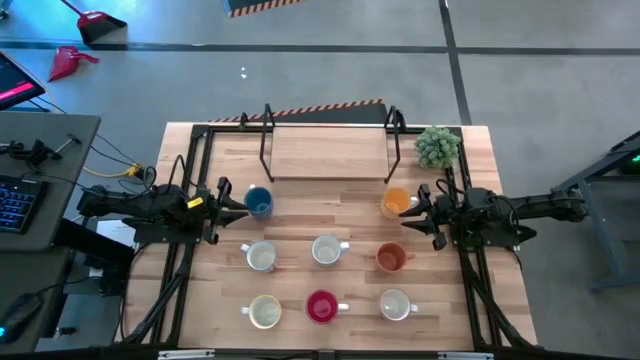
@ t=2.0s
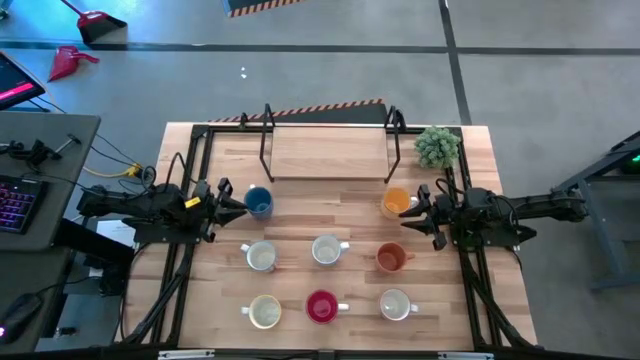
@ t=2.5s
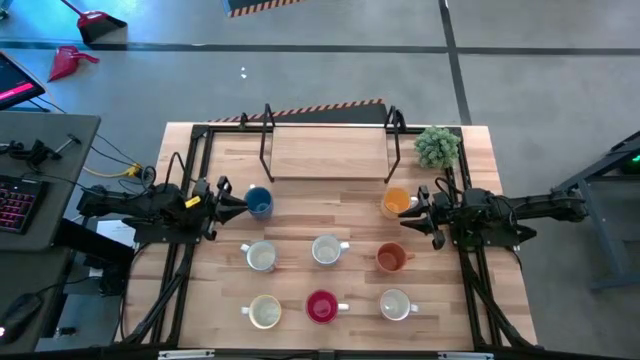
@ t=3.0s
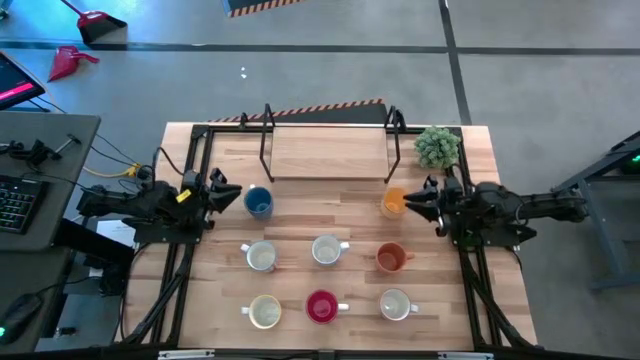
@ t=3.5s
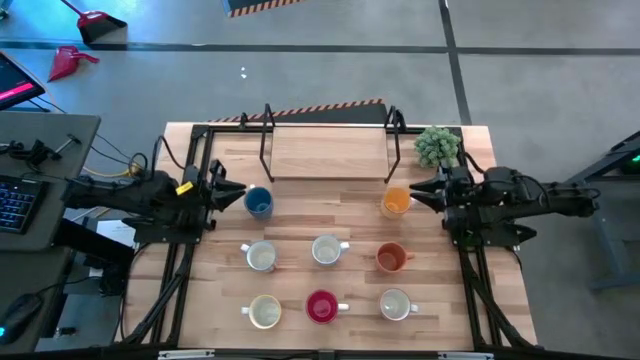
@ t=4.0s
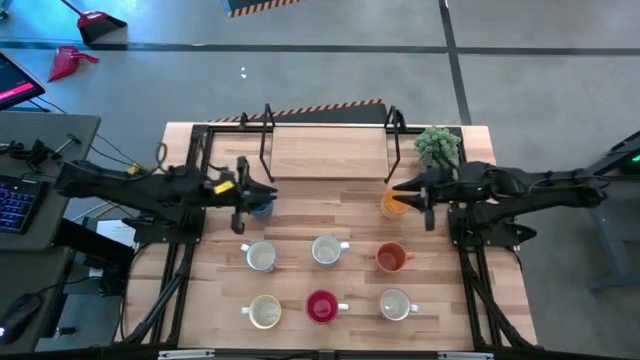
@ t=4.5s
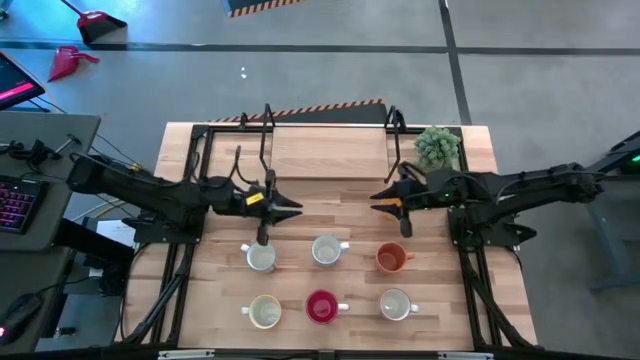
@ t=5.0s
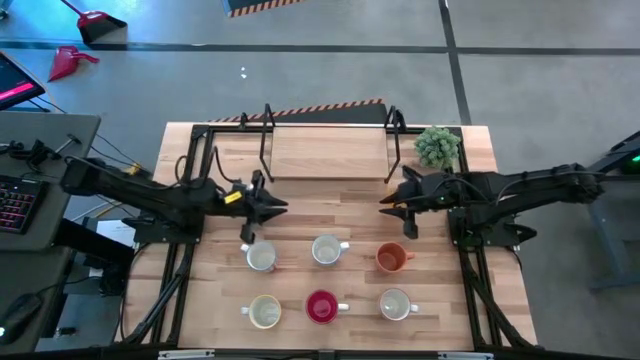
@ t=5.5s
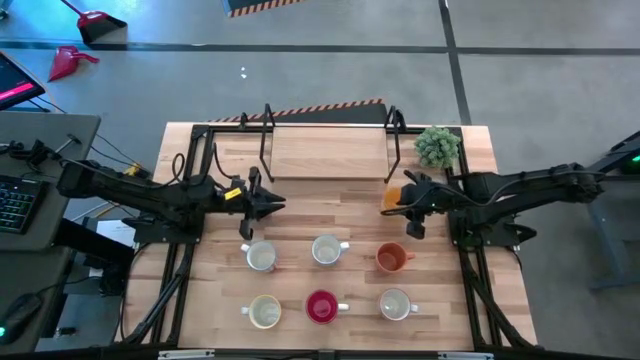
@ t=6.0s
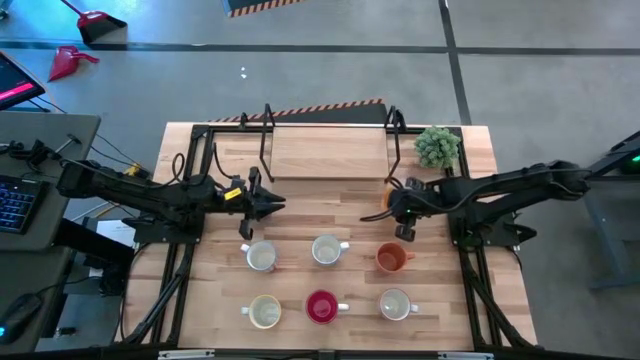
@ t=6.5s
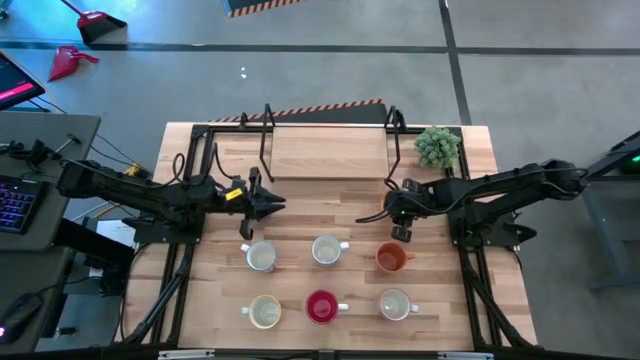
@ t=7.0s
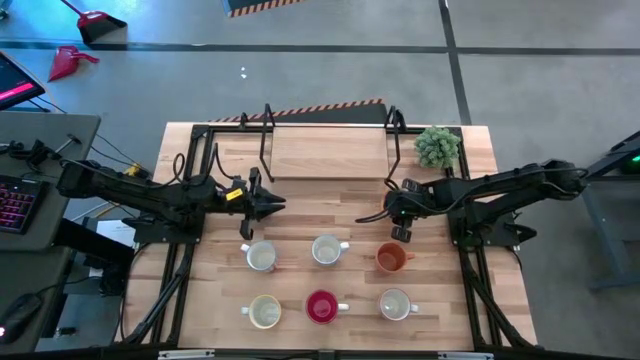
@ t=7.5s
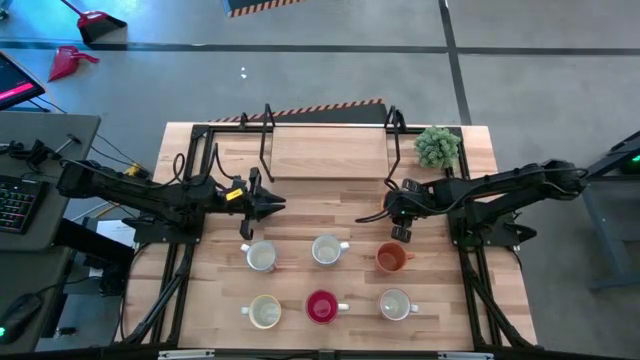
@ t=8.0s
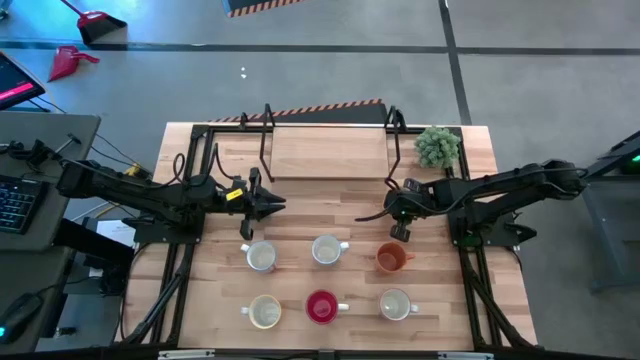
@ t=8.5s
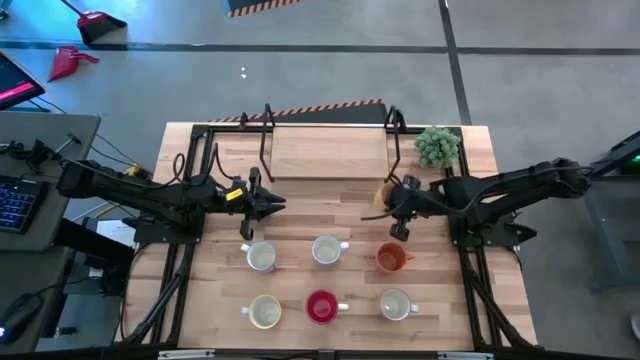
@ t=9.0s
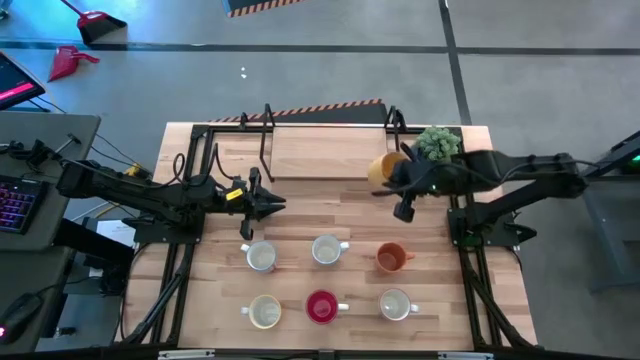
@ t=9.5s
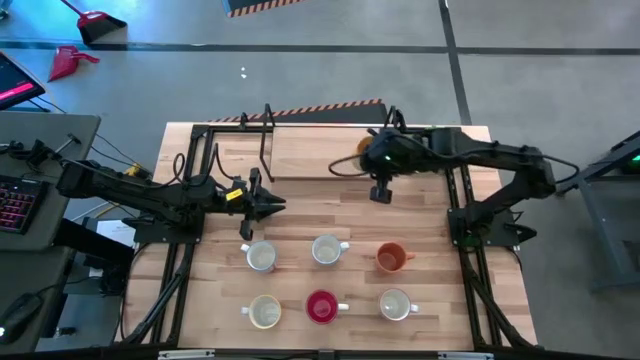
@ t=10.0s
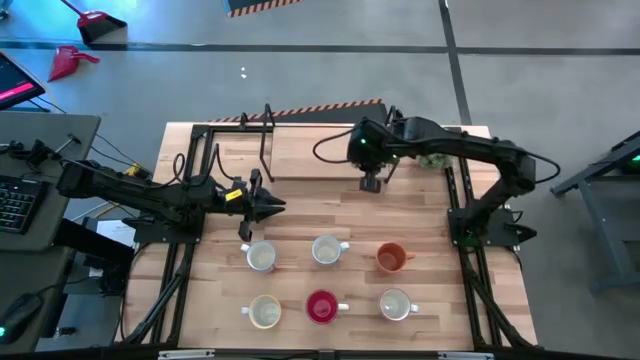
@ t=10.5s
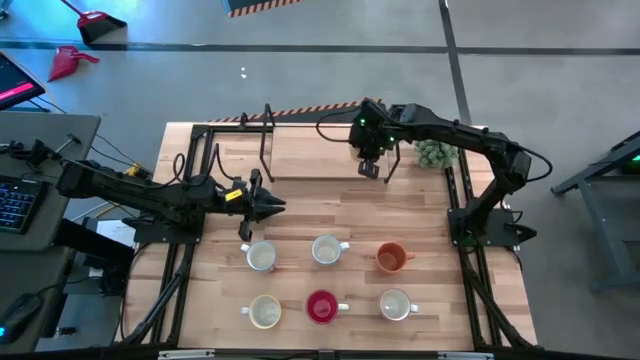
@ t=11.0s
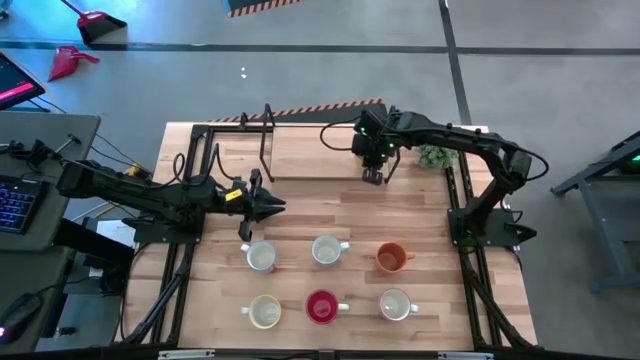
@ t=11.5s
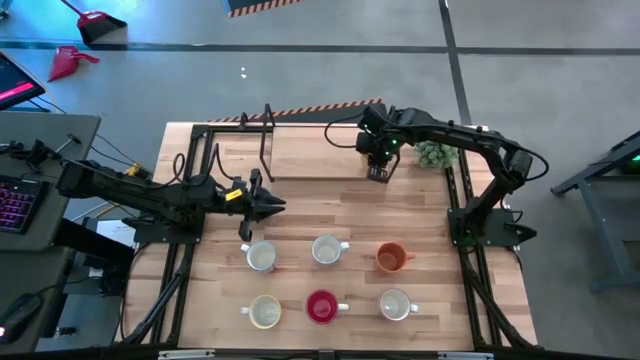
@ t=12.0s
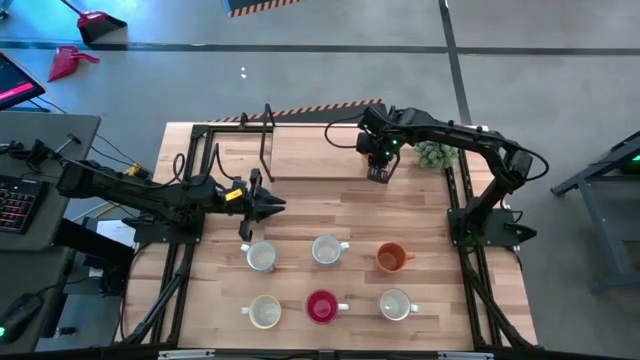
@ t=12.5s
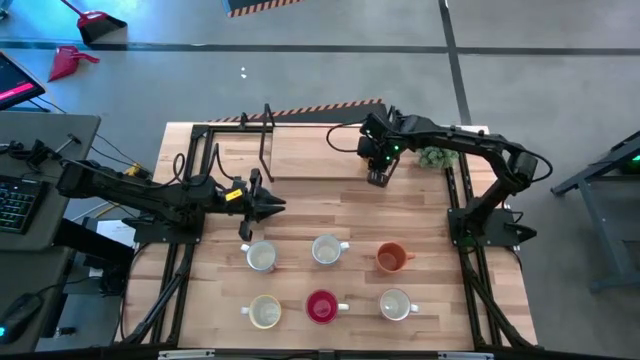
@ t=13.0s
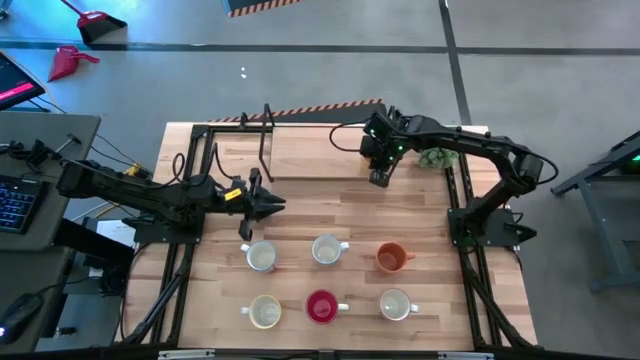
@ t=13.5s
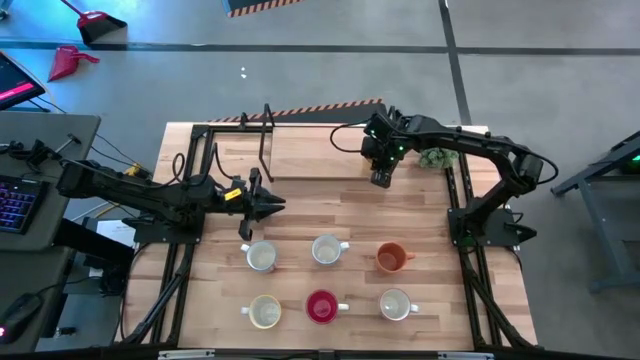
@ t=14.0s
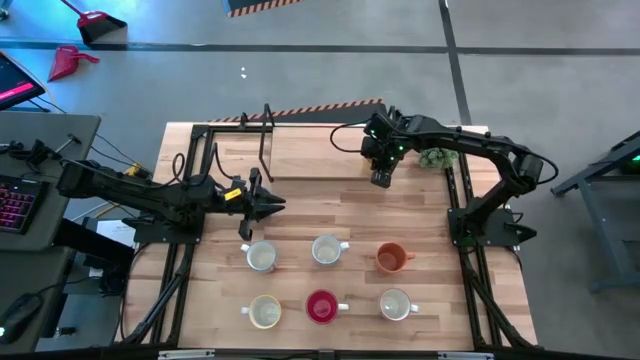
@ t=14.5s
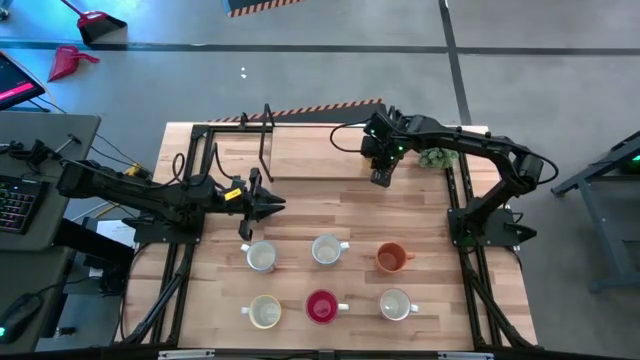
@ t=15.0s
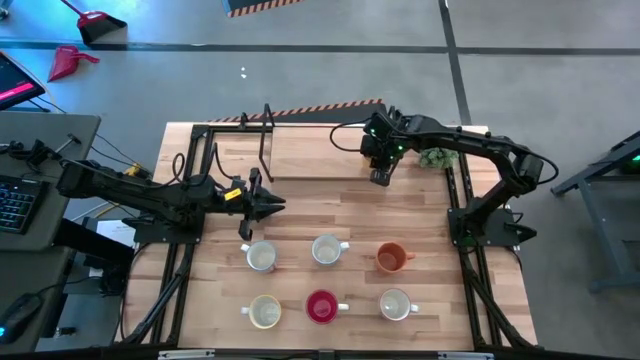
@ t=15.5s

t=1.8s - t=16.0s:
Task: Place coffee mugs
Put the yellow mug on the shelf

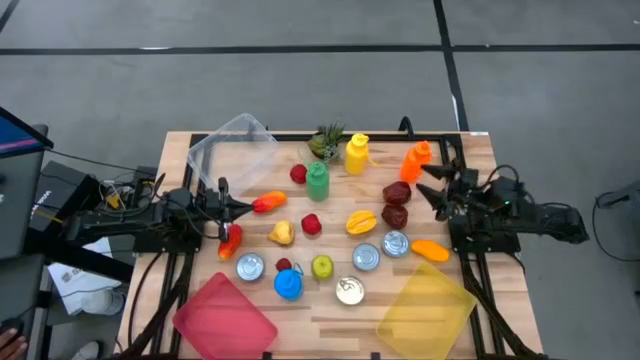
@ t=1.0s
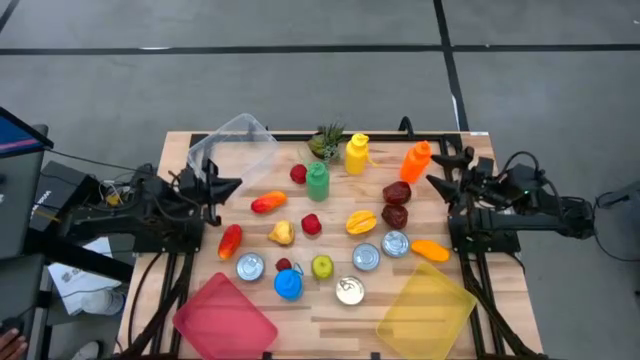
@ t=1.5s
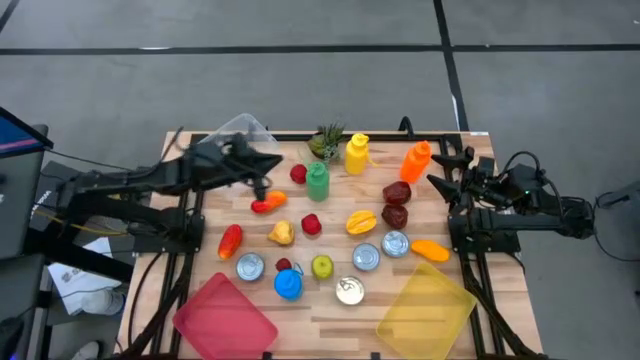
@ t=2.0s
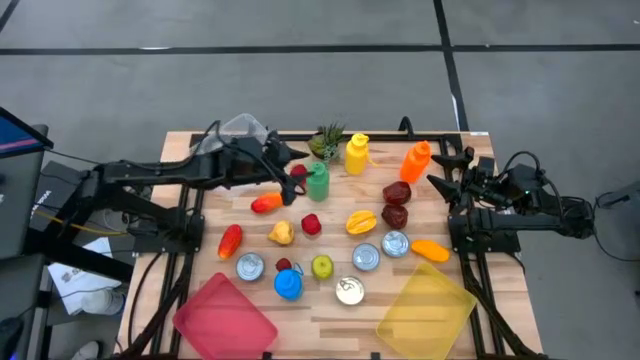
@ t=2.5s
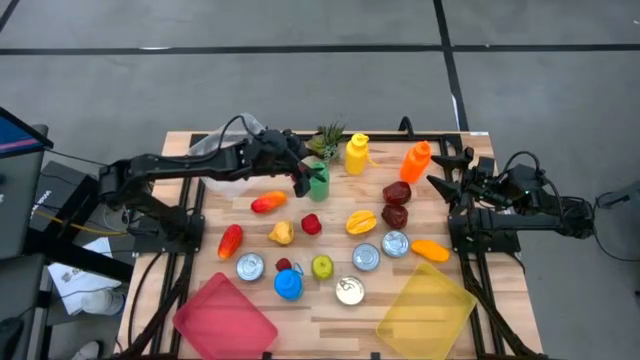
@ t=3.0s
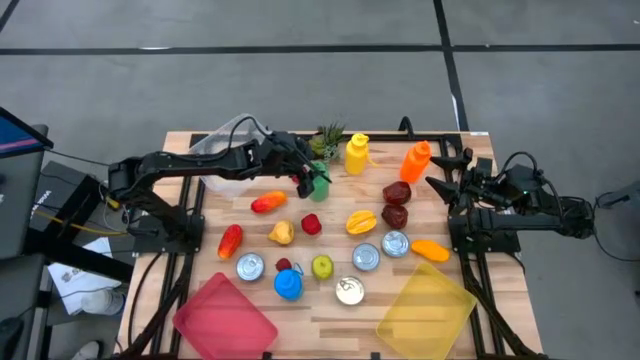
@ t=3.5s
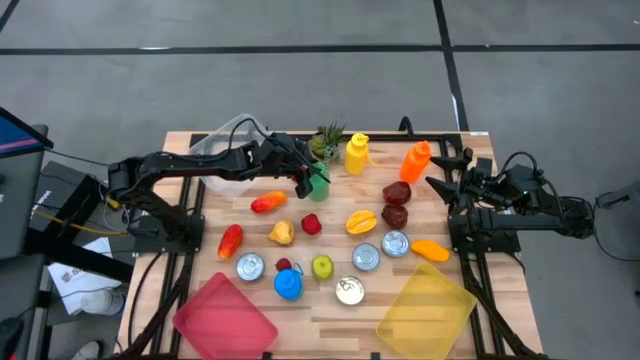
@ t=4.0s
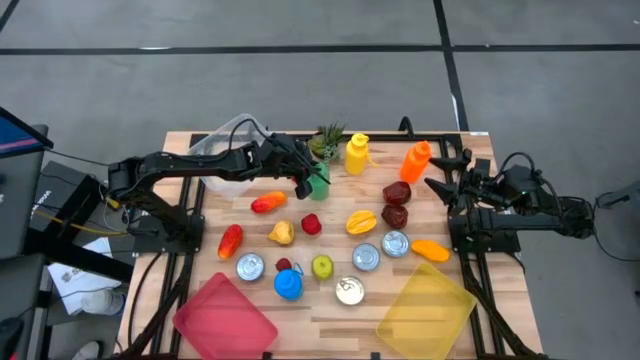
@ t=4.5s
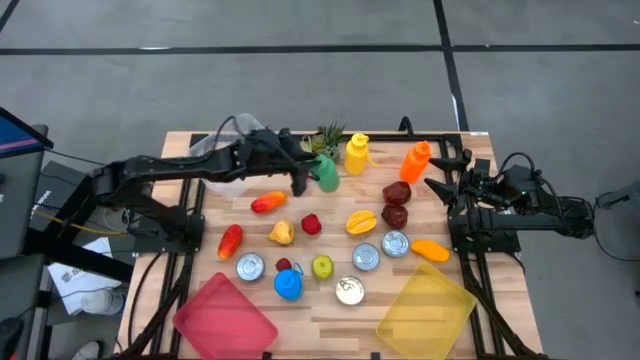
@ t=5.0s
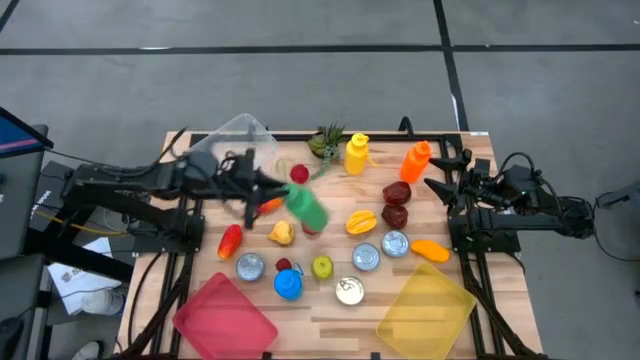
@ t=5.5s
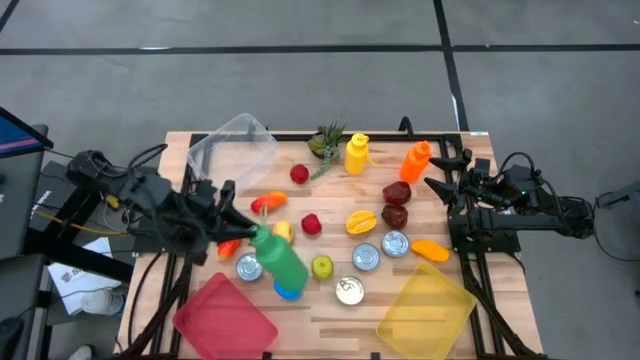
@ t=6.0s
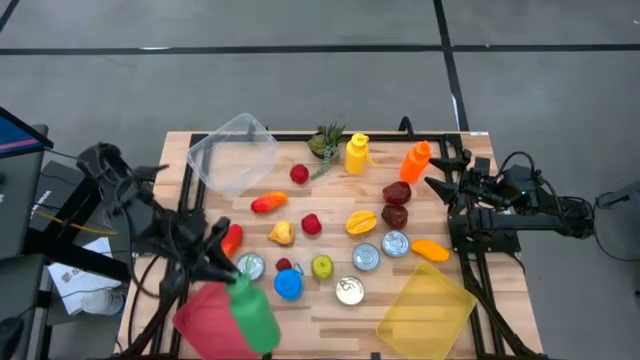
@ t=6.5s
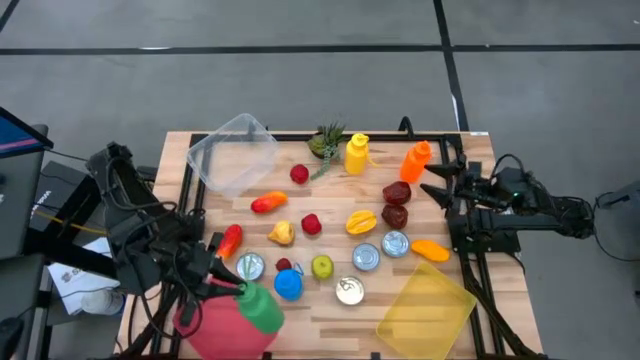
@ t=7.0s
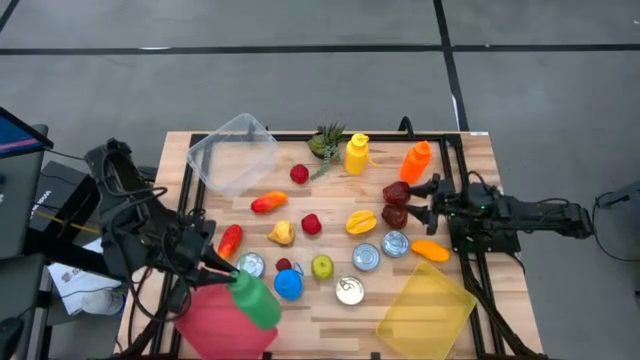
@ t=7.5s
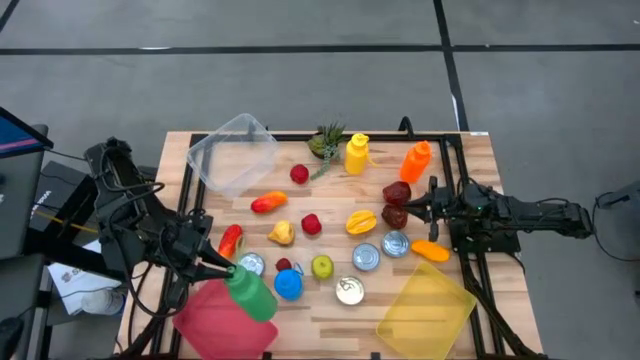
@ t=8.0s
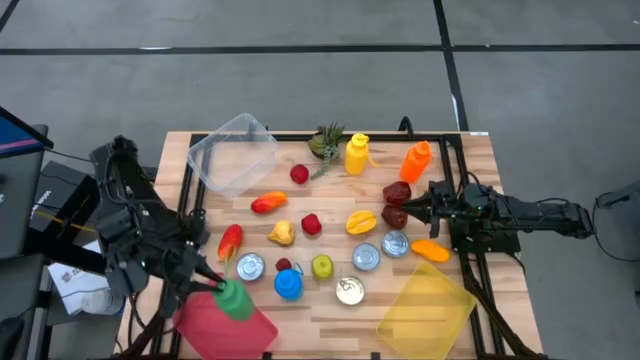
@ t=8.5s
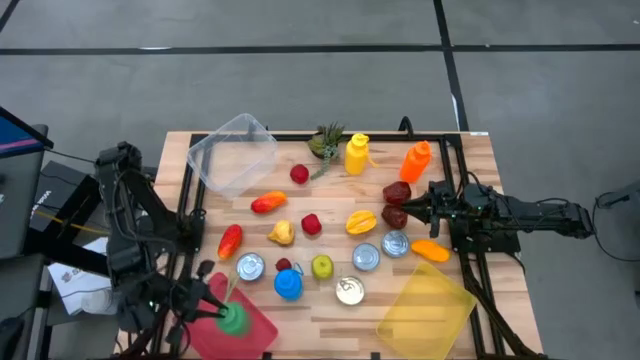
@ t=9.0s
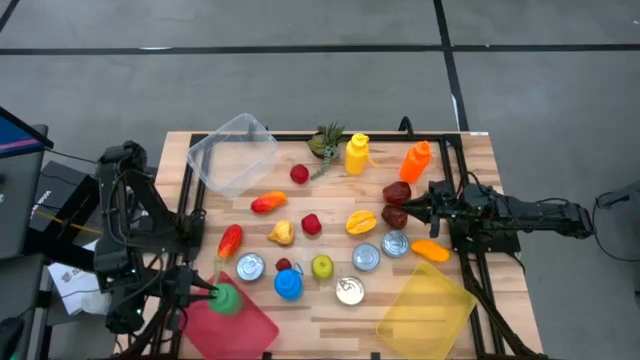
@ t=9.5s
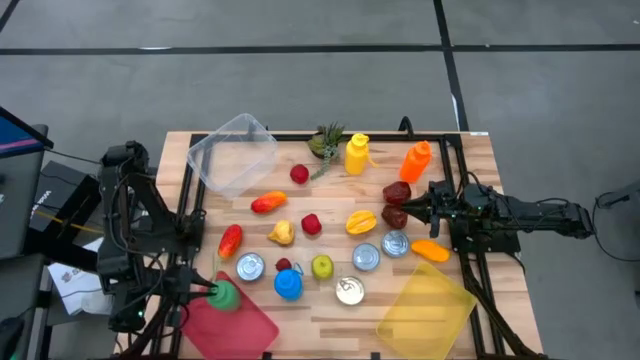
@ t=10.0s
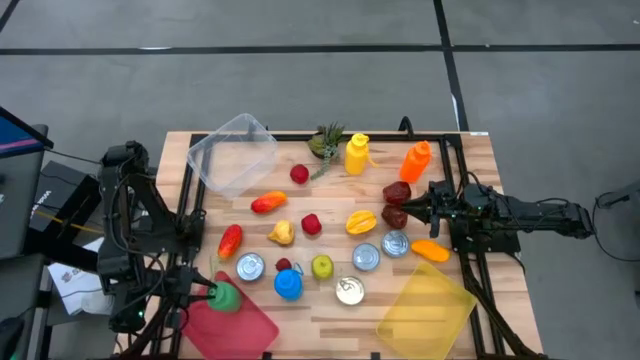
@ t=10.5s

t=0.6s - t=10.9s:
Task: Pick & Place Food Item
Put the green water bottle into the red bin
